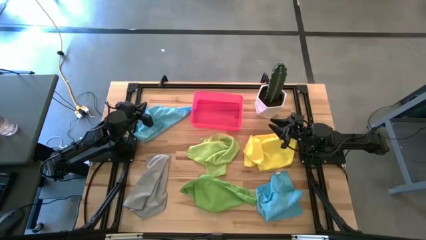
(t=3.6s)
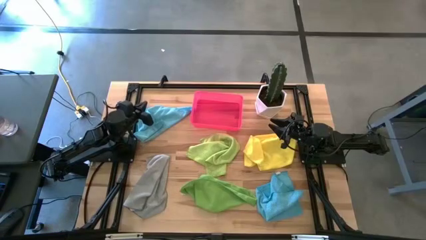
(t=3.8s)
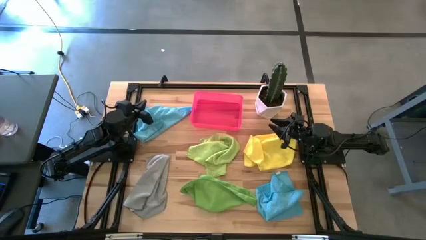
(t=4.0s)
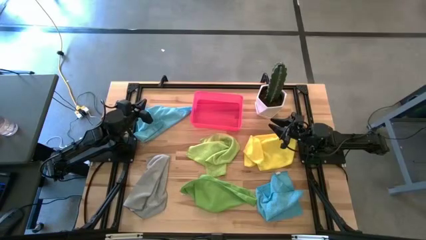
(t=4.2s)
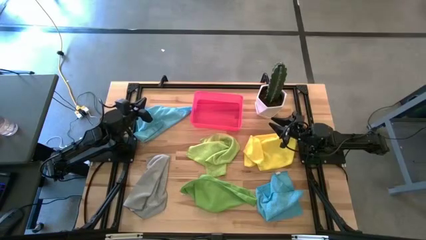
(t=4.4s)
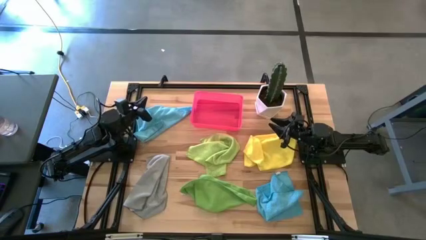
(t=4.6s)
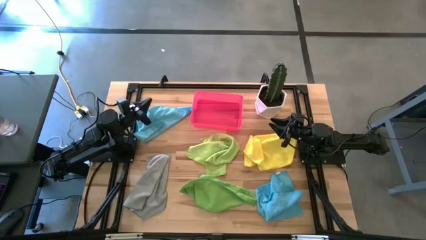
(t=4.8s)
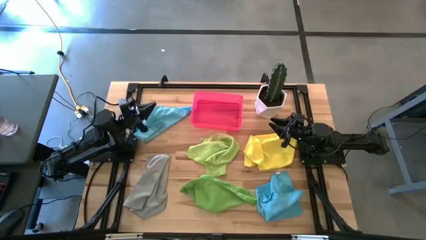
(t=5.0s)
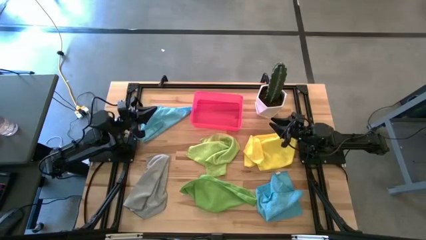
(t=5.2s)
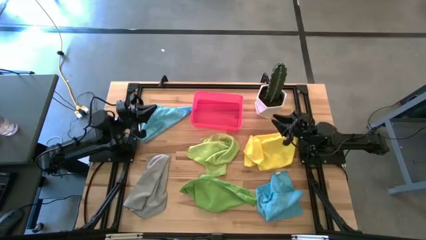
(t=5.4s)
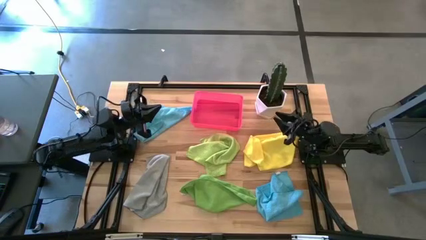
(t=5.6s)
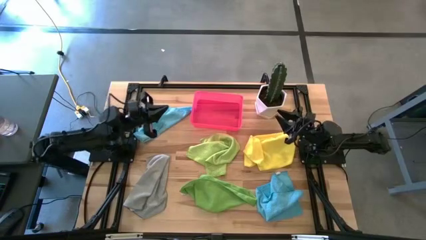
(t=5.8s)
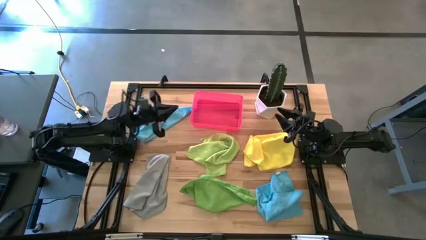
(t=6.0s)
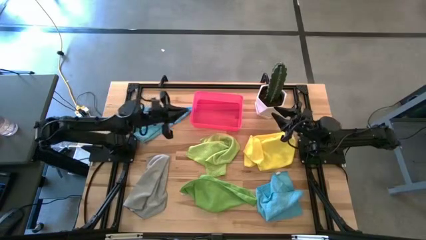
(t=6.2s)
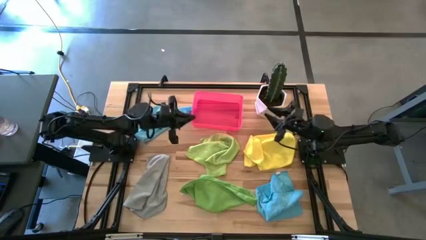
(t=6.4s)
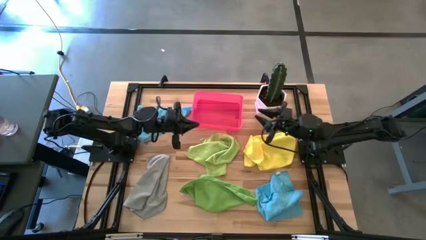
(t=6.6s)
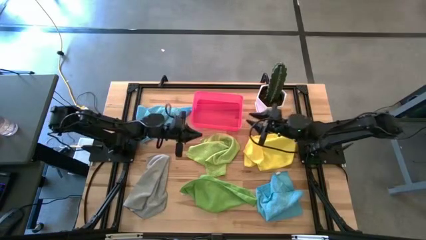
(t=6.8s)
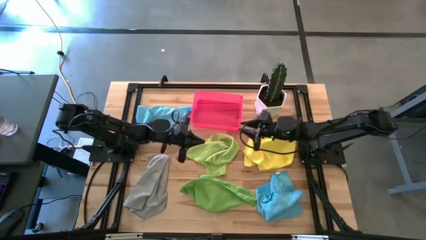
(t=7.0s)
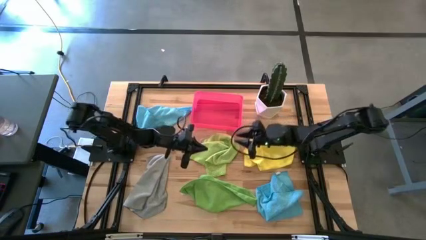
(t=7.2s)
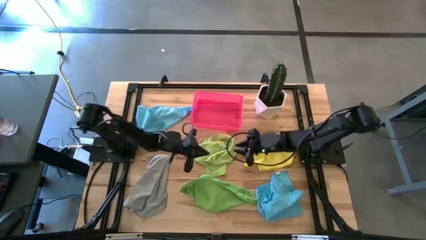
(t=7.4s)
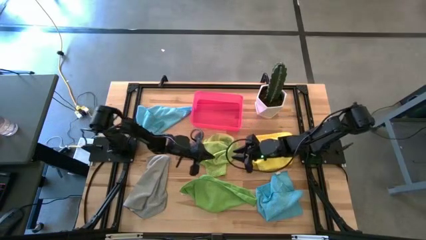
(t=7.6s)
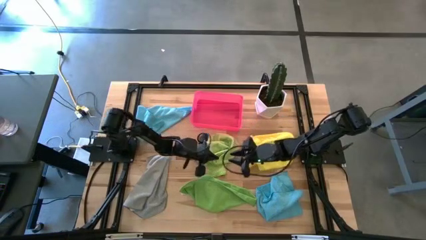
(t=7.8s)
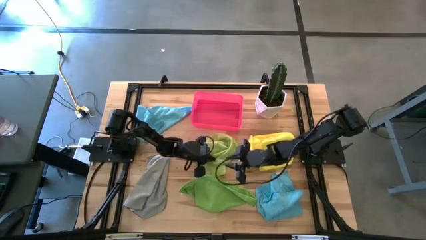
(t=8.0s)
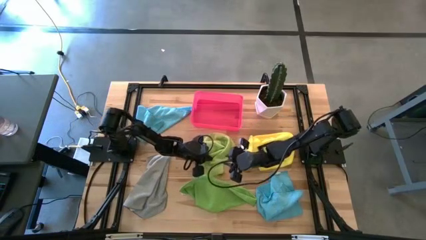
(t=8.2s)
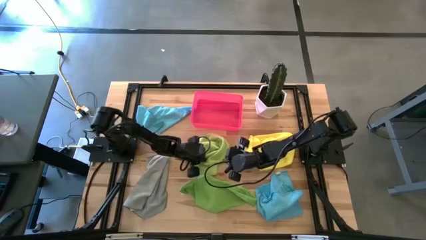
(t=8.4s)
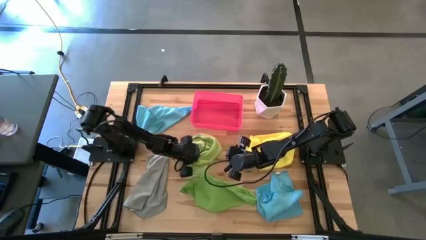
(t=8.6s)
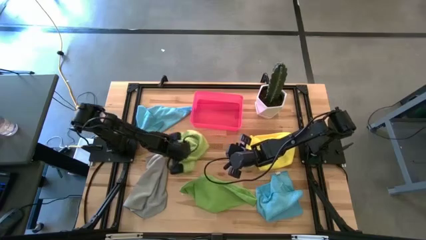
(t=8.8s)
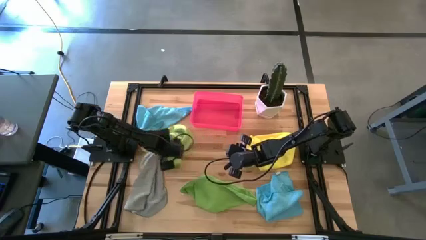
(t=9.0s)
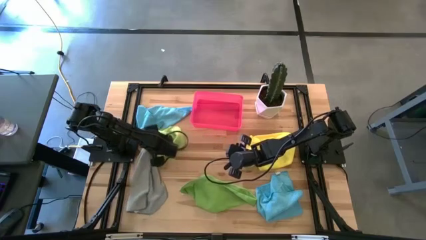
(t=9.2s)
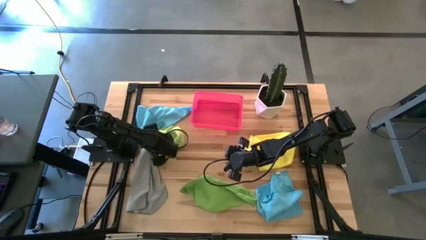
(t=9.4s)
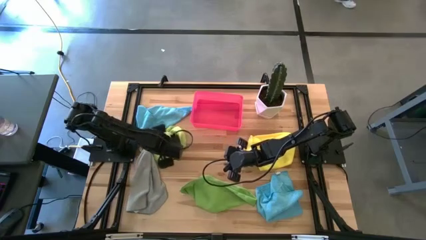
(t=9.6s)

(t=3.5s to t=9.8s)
Task: Fold microfiber towels
Move the light green microfiber cloth to the middle left of the table

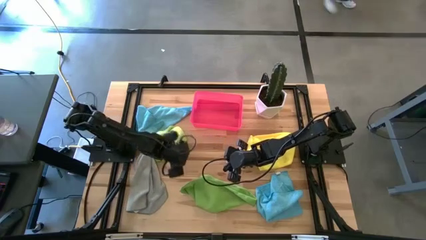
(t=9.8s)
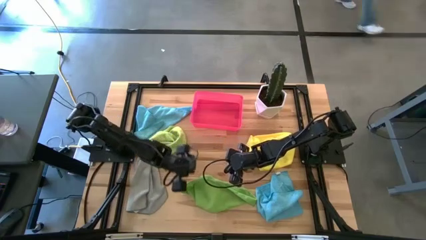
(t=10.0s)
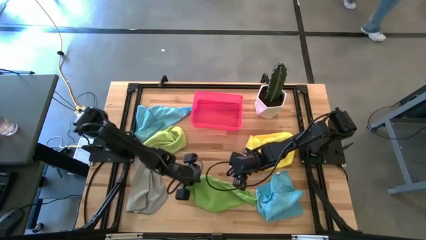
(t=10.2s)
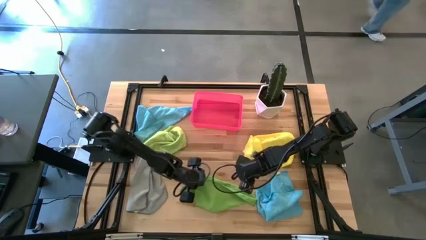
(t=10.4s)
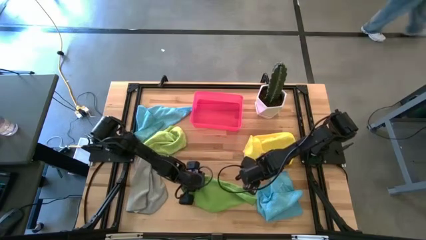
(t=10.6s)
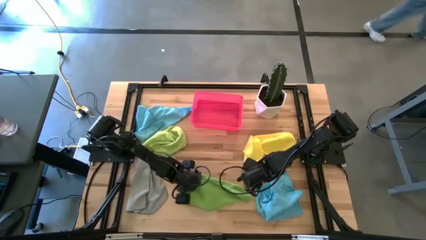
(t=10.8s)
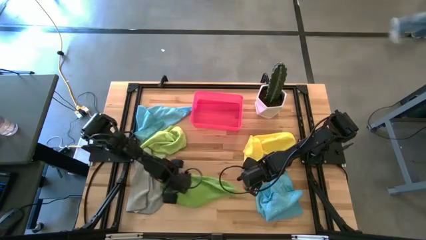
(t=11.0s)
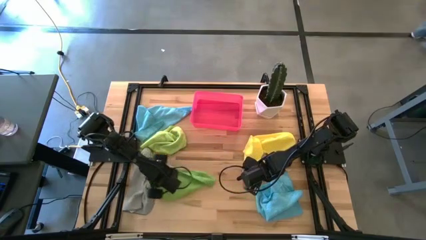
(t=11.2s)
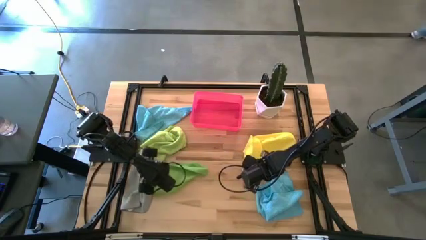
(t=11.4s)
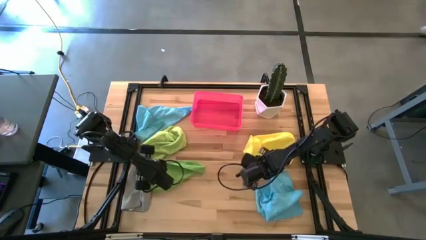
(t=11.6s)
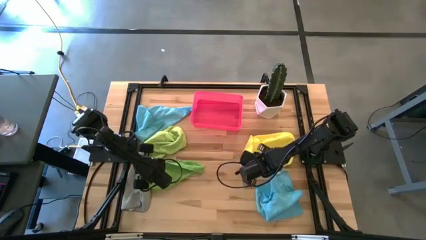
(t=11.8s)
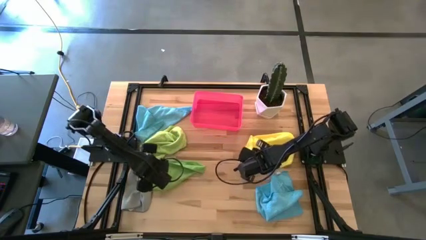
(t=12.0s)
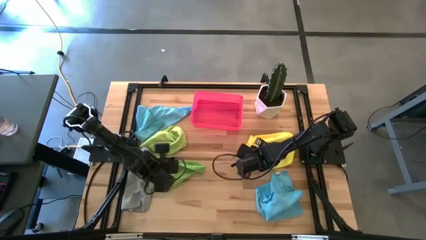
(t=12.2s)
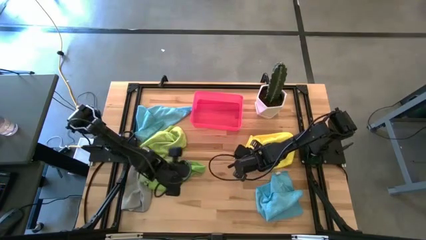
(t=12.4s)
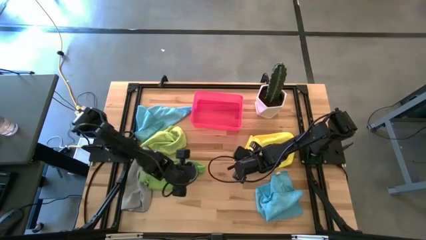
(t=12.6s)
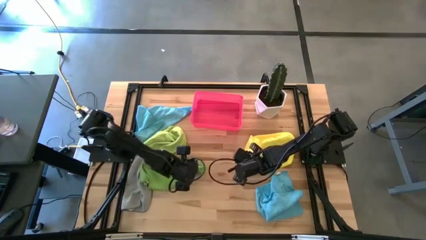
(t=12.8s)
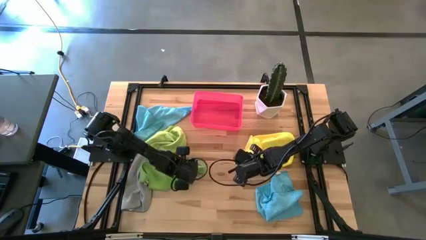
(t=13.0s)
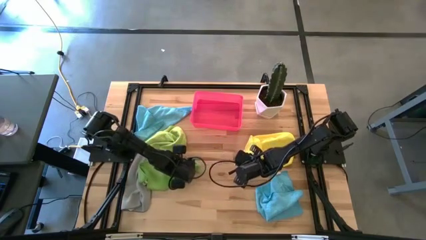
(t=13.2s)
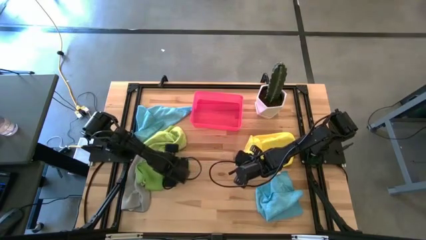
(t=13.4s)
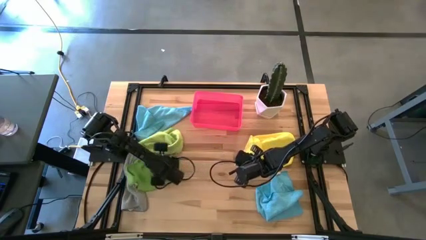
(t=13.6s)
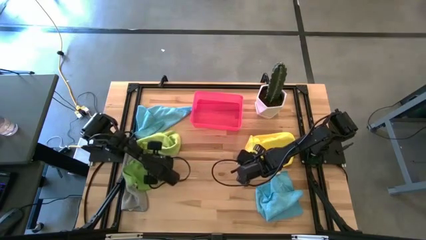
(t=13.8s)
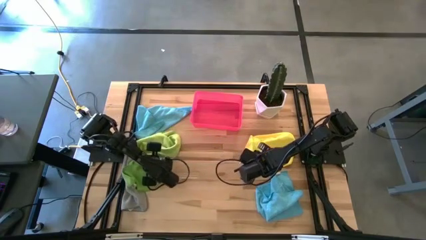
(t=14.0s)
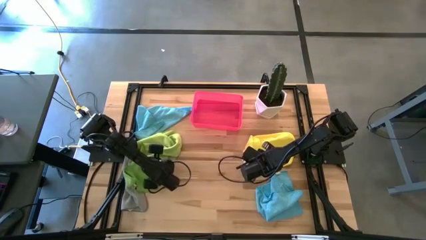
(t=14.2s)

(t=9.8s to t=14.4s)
Move the green microfiber cloth to the middle left of the table

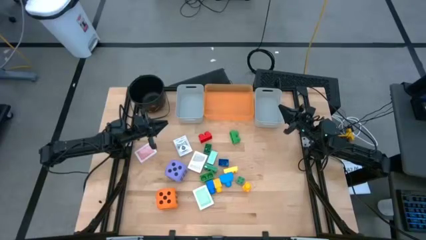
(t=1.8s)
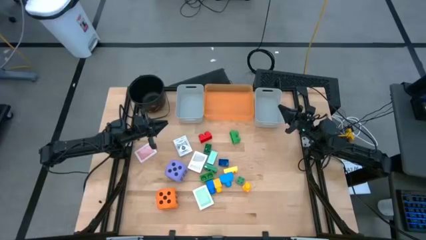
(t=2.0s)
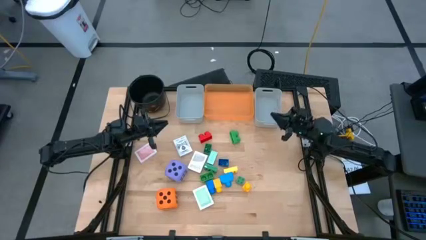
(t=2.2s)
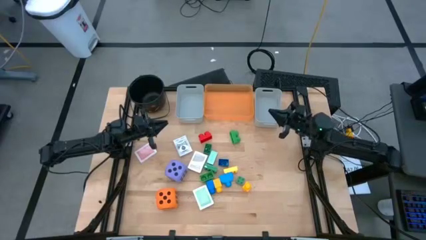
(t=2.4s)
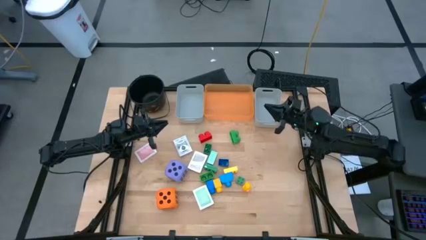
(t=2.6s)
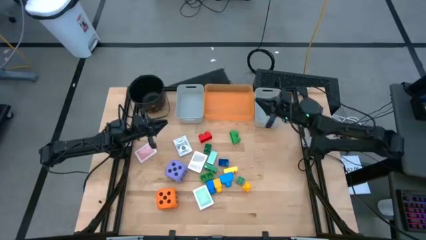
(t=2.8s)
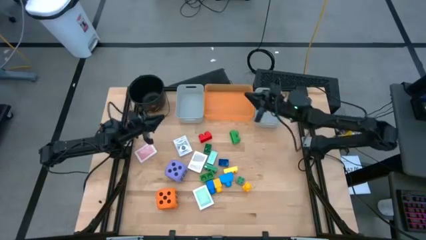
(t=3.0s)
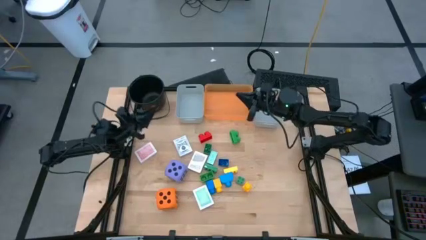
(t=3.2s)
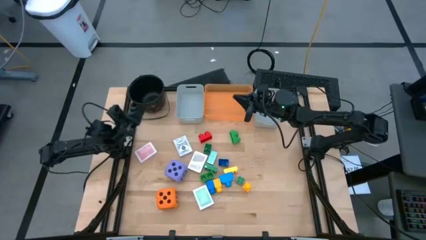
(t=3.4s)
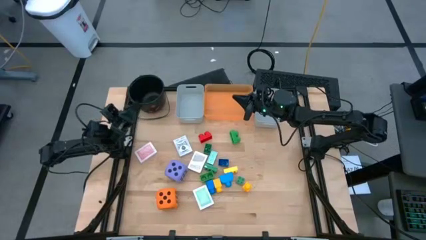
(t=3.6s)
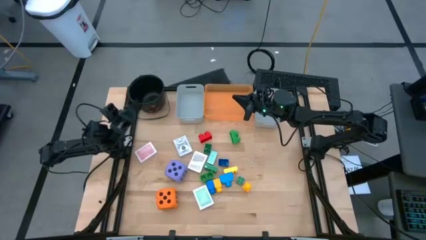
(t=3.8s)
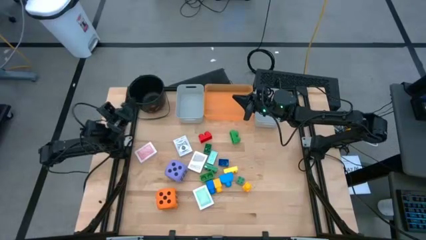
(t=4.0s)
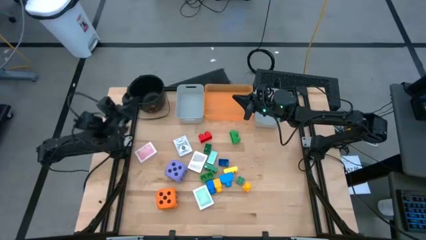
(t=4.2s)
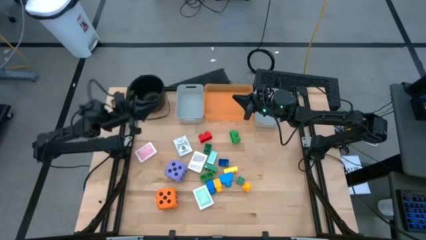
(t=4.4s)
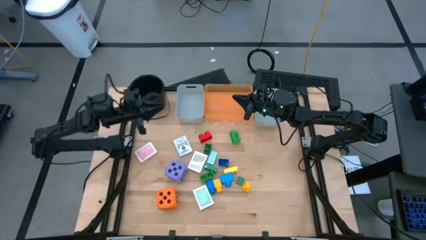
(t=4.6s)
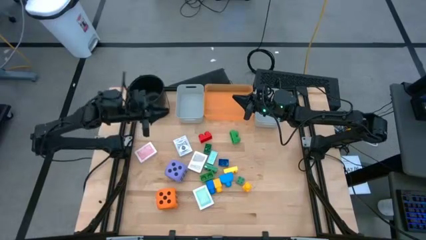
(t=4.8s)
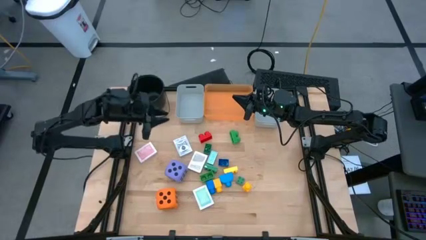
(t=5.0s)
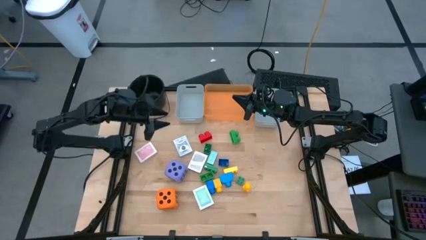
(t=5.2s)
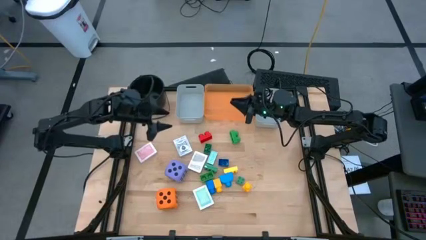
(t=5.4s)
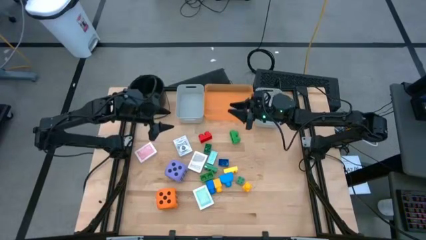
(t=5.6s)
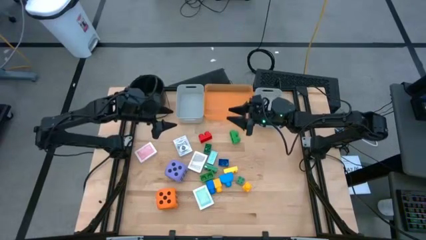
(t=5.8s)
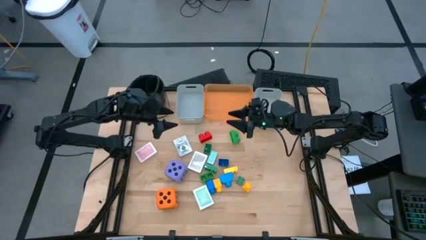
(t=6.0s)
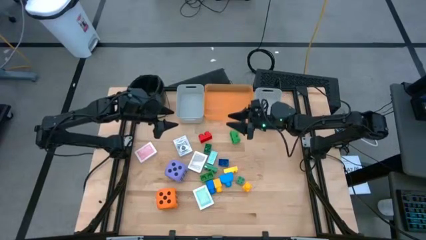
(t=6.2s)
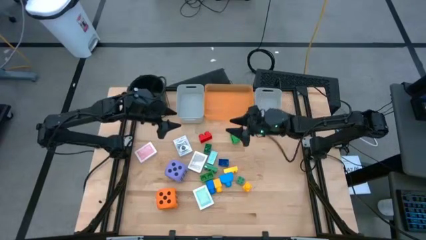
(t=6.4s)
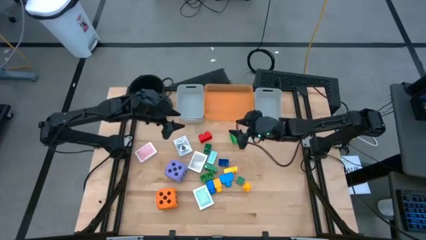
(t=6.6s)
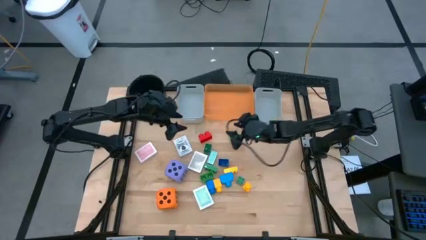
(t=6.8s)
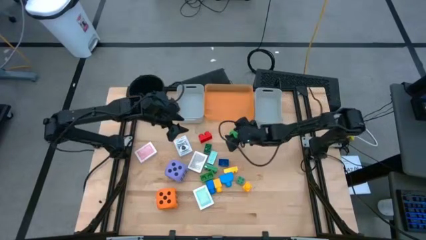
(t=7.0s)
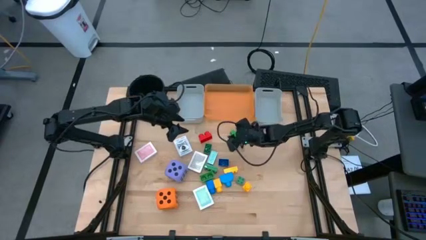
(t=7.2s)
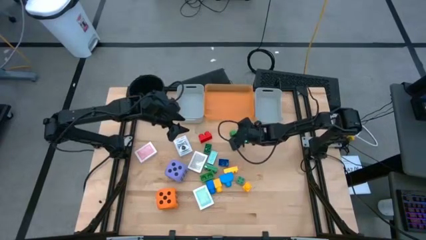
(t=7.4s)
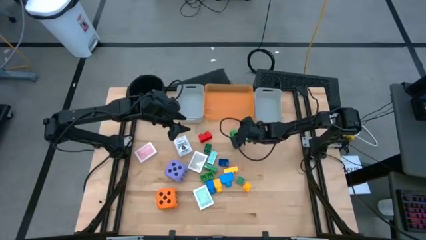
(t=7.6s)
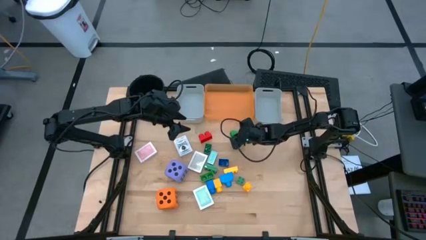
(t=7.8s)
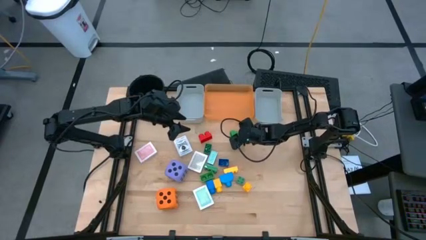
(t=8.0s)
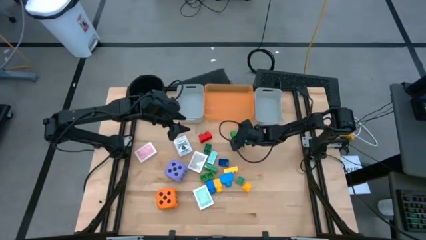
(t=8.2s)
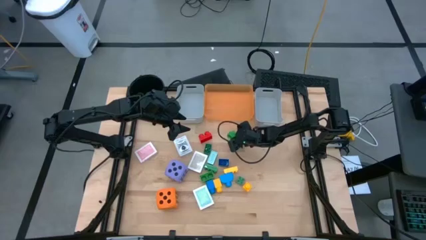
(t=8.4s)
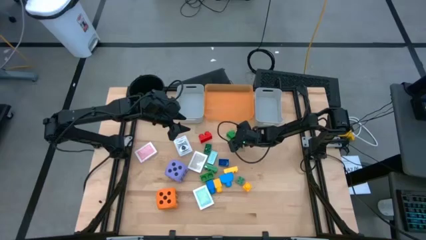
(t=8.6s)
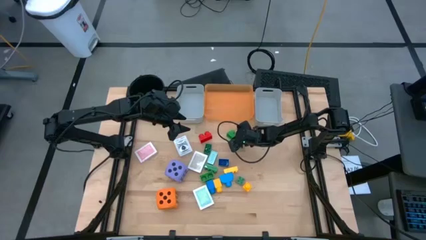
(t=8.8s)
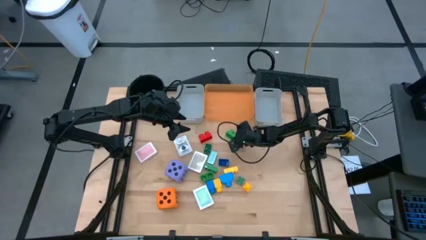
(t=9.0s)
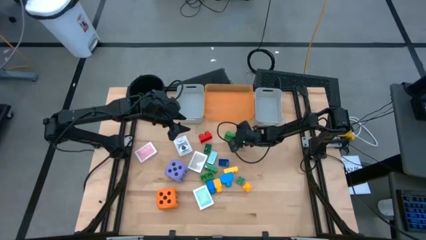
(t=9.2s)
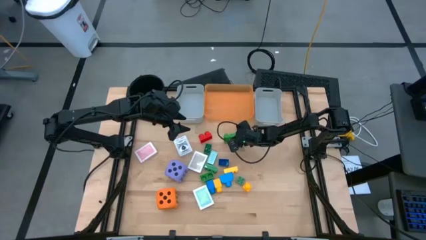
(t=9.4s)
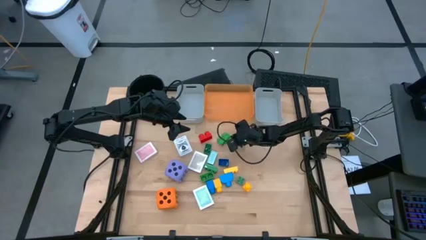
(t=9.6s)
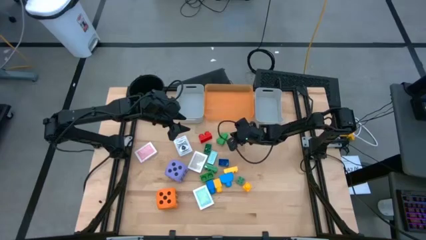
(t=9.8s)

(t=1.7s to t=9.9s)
Task: Pick & Place Toys
Put the top green game piece into the orange bin
